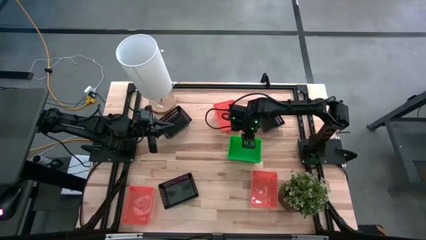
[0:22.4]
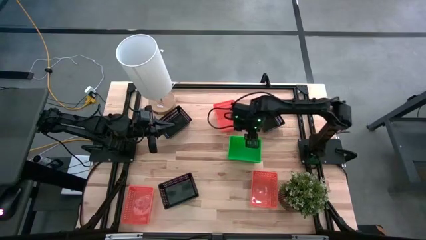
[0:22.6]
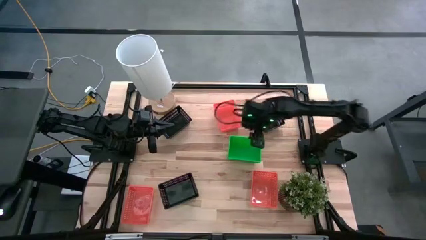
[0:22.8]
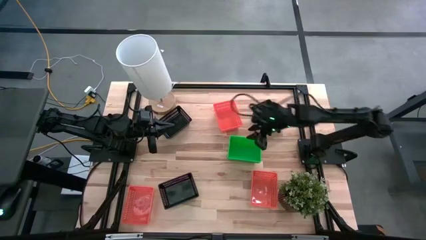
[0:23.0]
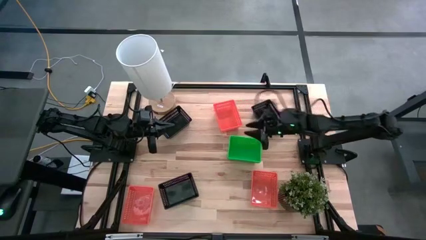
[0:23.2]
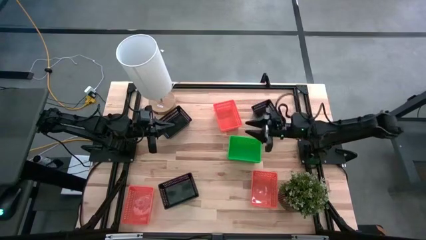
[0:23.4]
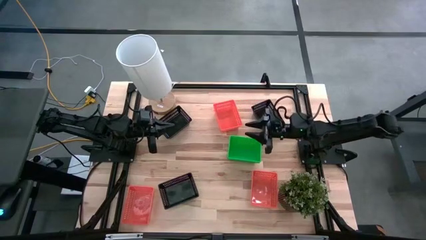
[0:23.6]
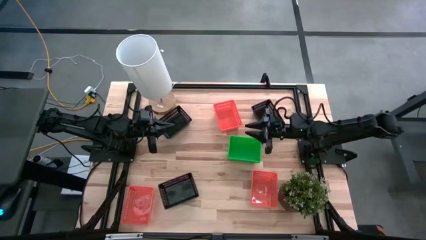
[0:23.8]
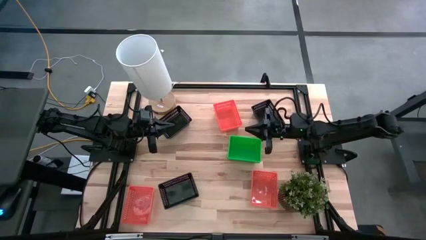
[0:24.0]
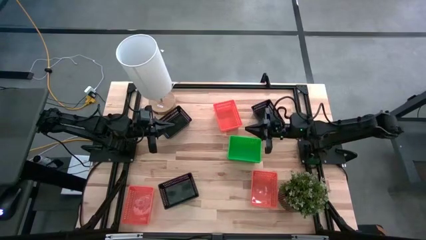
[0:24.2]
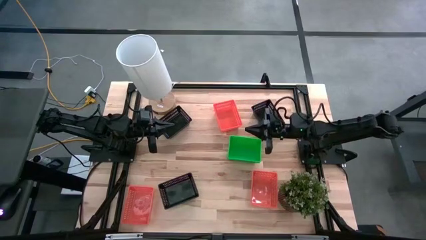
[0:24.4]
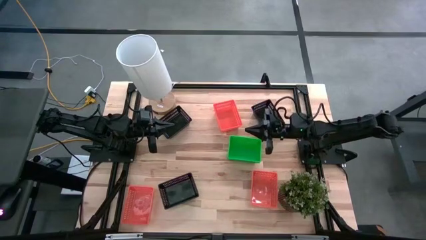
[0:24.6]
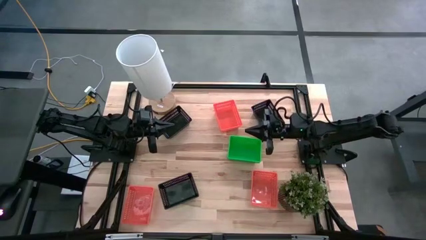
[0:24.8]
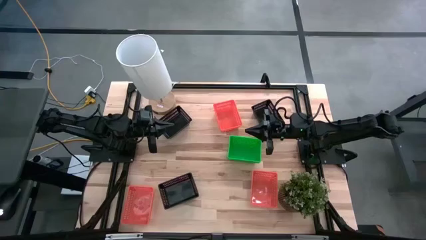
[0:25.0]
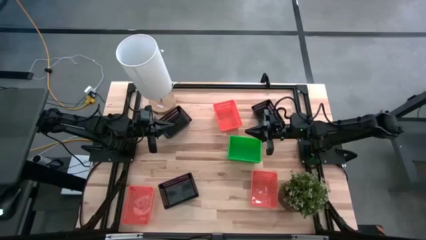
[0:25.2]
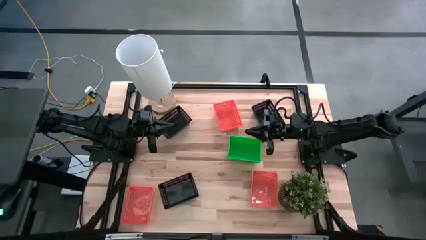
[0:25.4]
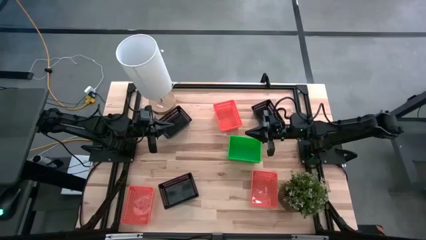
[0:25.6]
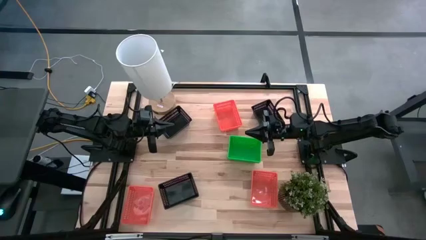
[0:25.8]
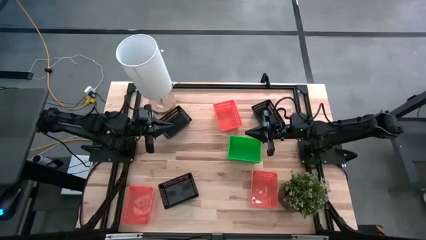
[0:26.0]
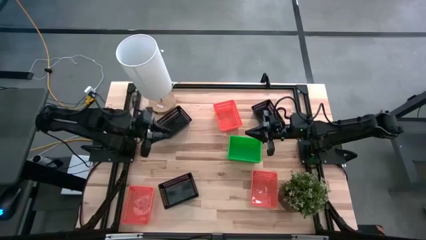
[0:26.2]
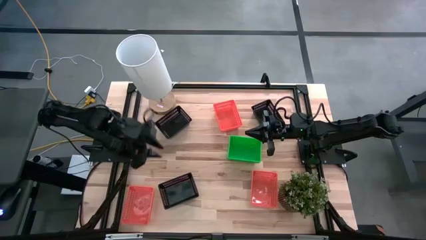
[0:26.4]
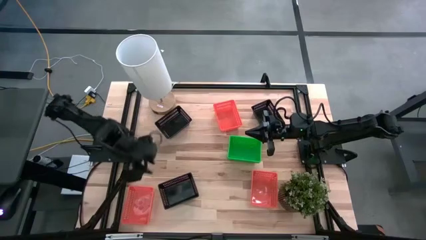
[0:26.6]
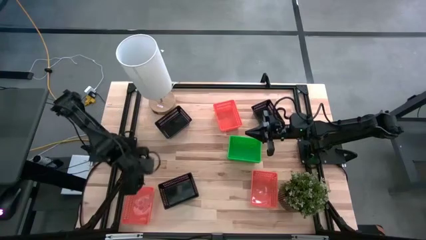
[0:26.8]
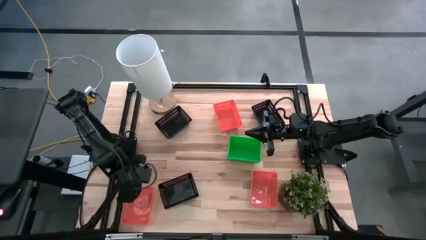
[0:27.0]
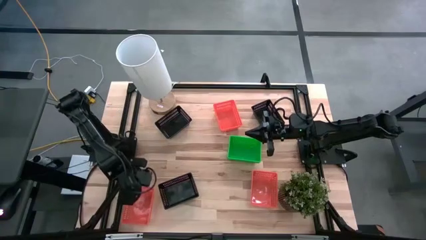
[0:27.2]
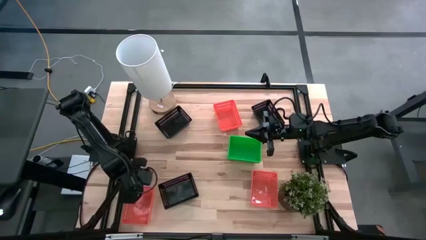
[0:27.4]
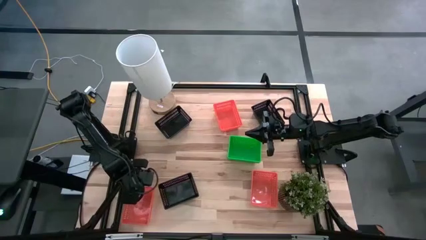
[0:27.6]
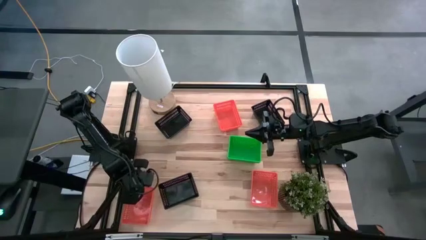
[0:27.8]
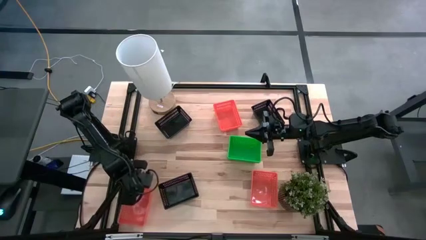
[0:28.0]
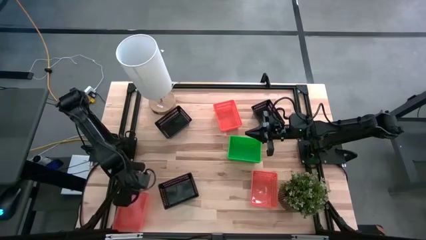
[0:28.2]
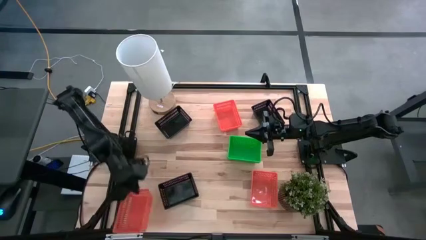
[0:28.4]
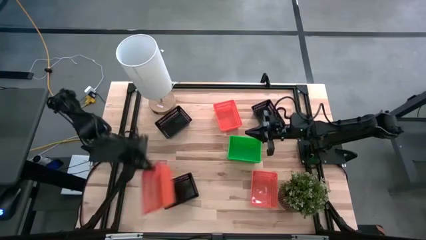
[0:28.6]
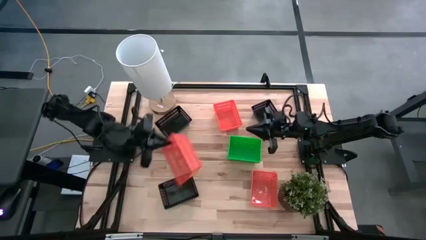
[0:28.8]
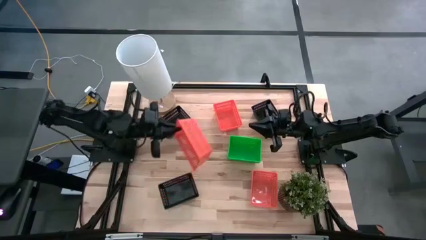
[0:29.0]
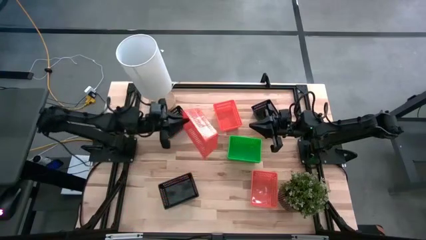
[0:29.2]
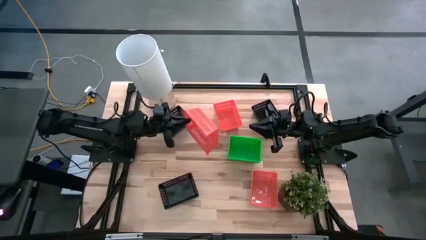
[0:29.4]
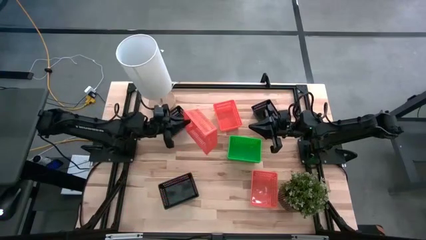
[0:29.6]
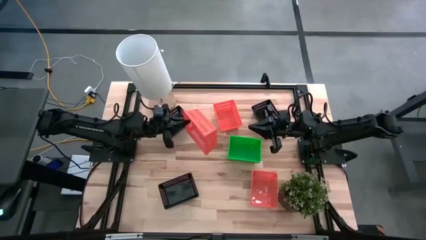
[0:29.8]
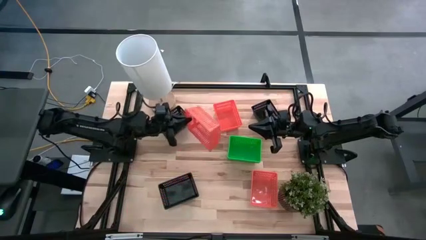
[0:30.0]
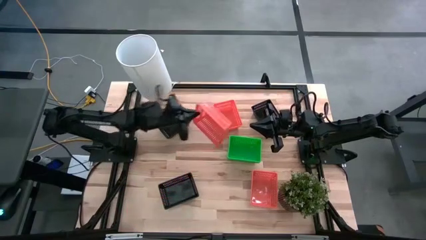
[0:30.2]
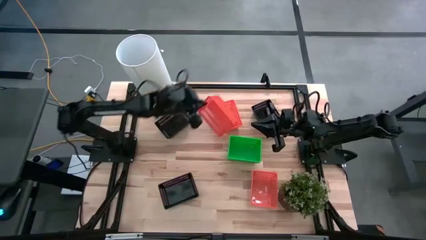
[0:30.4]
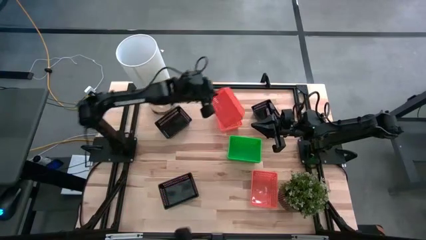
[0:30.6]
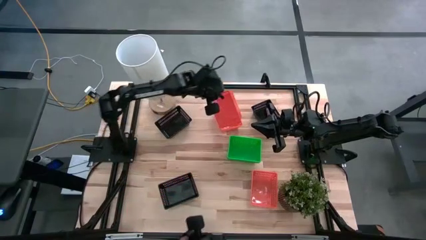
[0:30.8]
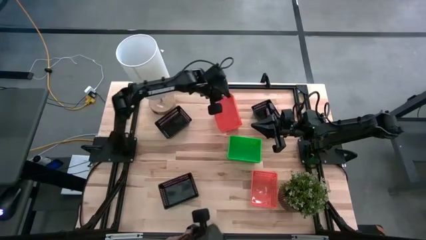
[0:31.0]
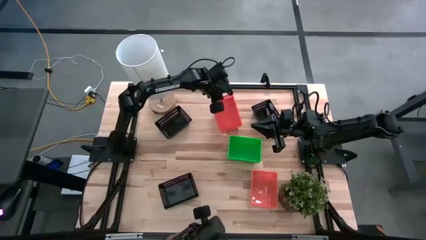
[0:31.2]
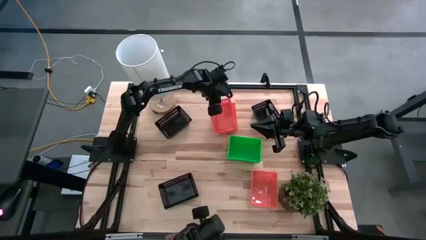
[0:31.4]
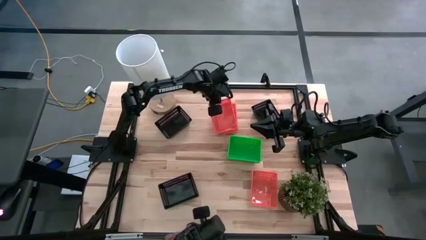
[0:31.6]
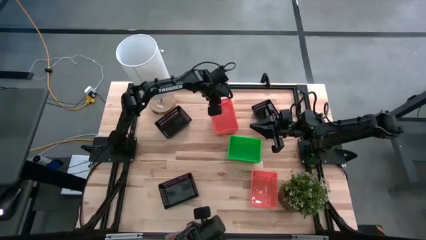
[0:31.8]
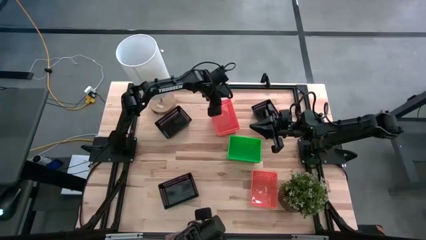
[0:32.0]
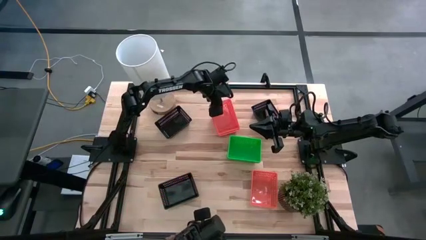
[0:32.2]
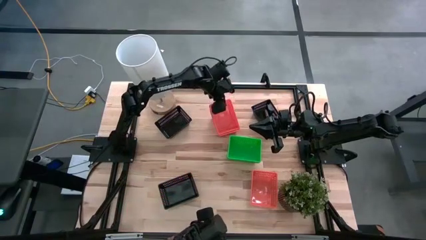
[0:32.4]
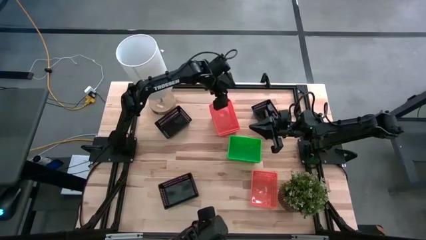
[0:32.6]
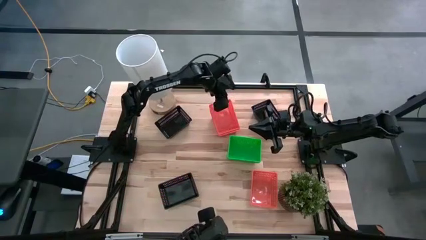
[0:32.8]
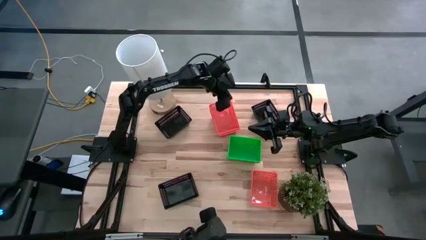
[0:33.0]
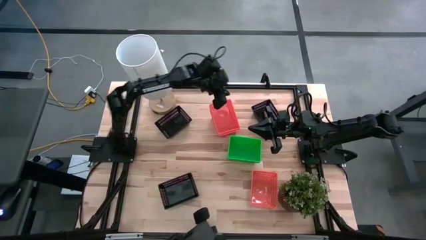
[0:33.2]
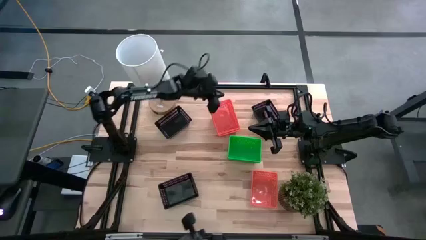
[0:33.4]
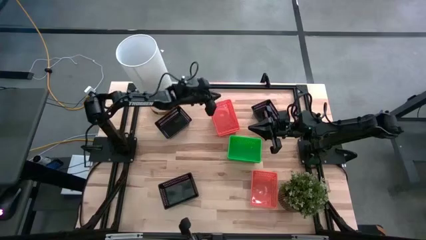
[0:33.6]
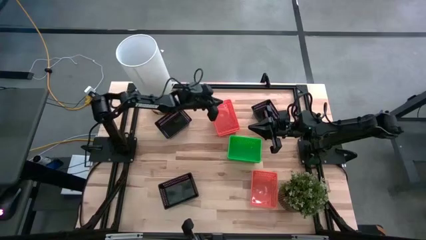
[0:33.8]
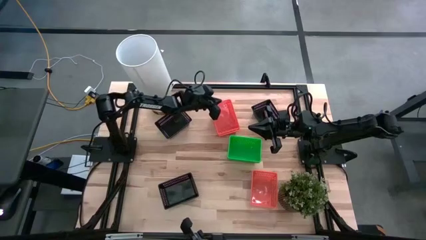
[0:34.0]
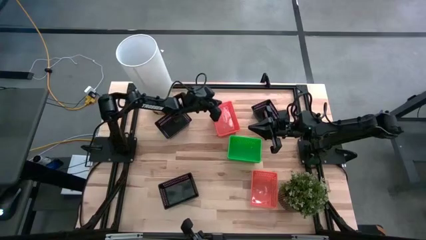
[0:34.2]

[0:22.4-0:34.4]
Stack the bottom left orange bin on top of the top orange bin

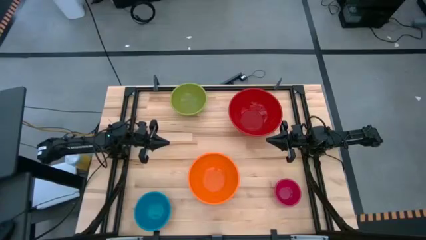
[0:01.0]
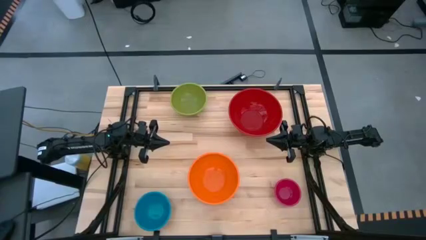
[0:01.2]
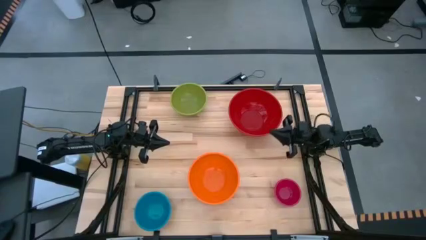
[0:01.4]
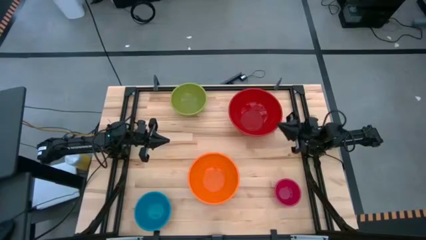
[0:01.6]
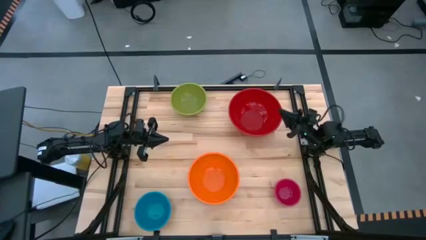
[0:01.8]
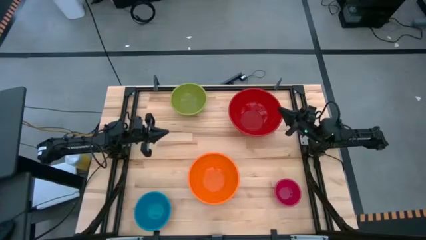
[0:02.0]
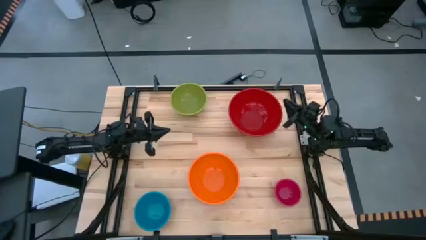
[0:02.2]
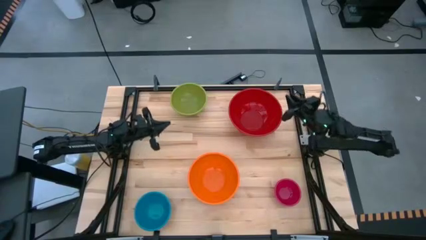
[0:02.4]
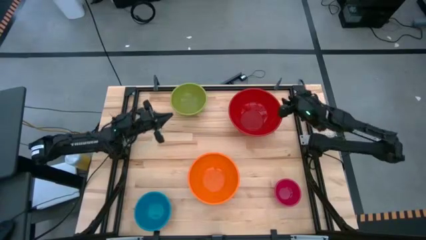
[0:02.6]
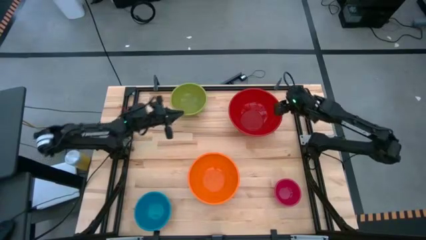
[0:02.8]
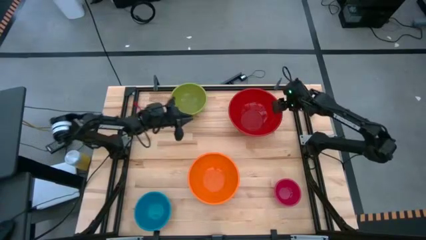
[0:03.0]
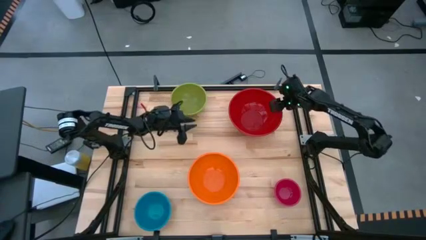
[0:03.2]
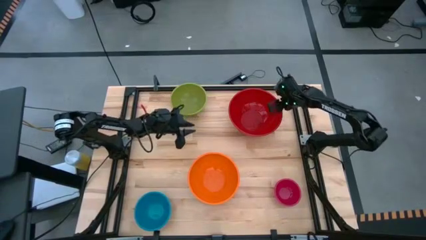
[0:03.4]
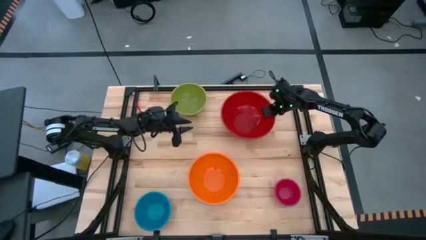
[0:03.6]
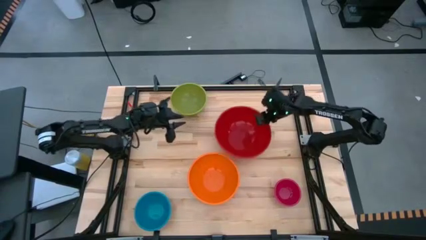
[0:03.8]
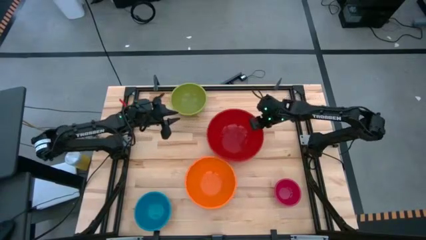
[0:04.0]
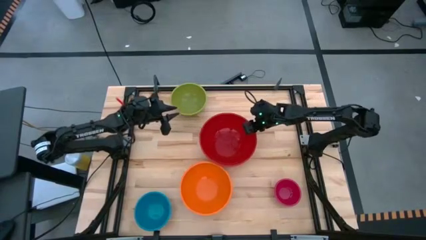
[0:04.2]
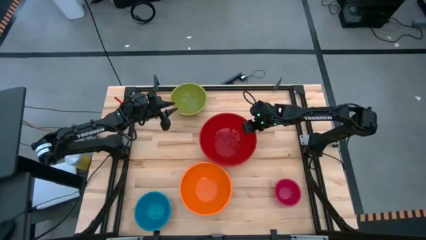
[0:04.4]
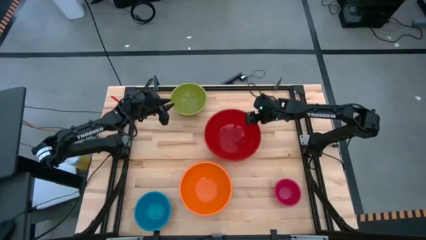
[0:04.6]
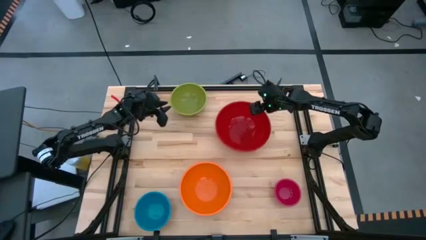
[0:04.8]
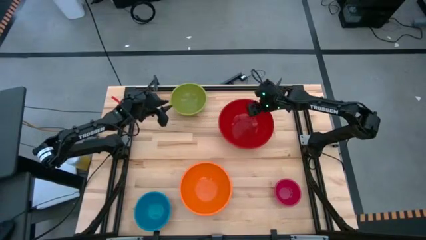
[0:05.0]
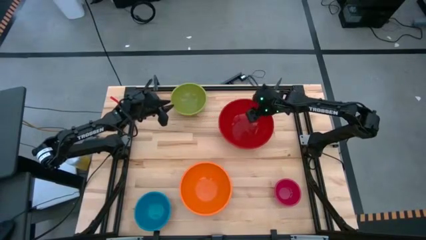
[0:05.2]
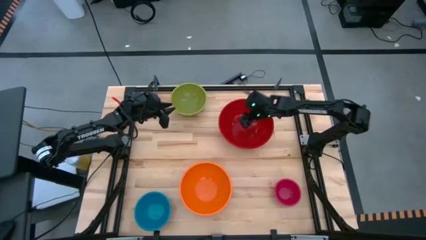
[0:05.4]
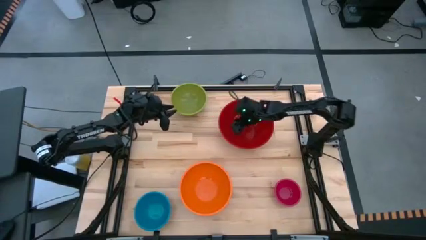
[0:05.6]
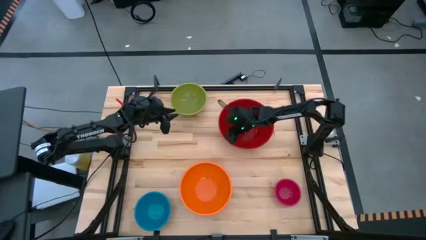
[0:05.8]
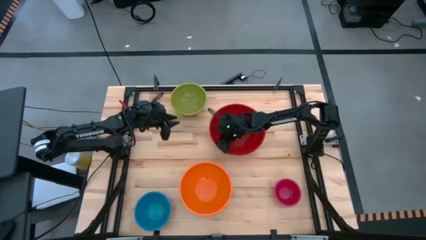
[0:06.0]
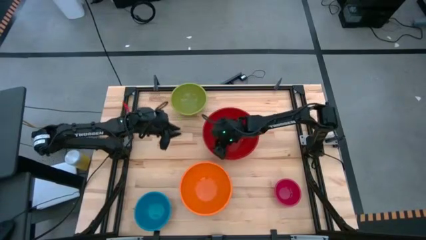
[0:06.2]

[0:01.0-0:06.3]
Move the red bowl to the center of the table
